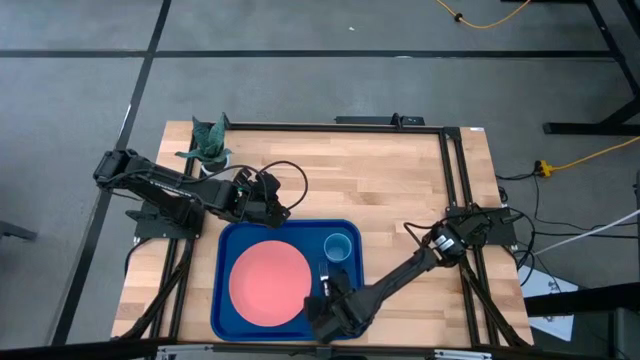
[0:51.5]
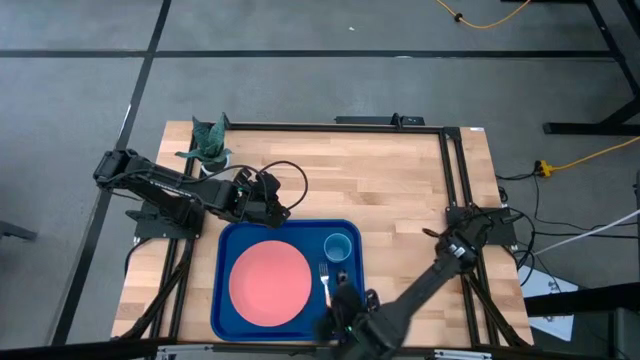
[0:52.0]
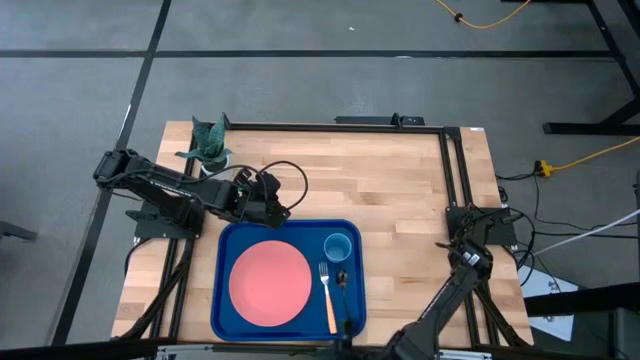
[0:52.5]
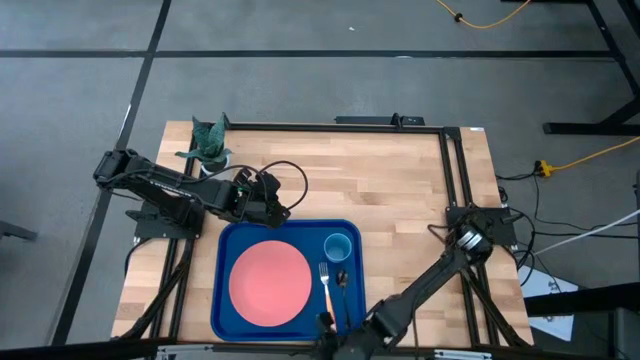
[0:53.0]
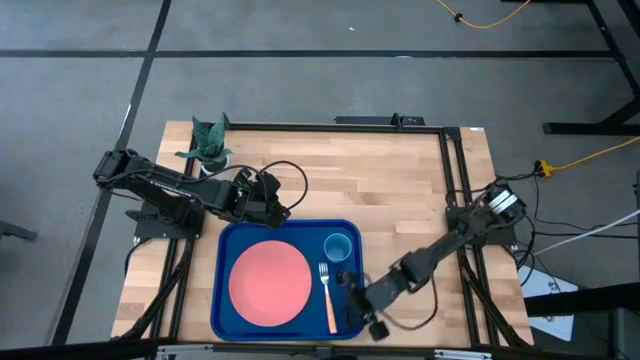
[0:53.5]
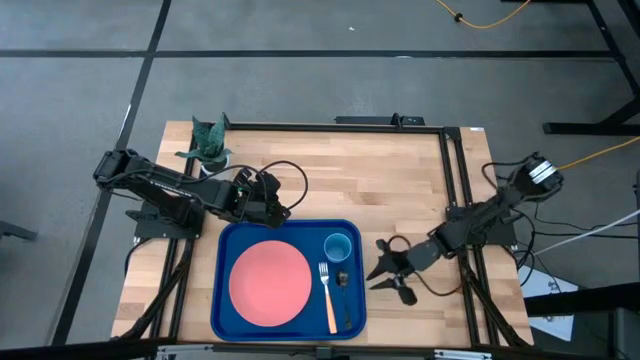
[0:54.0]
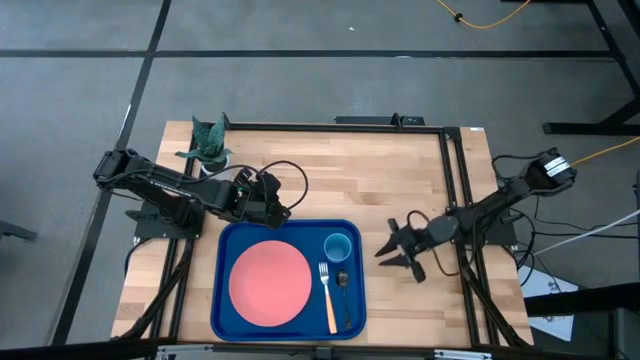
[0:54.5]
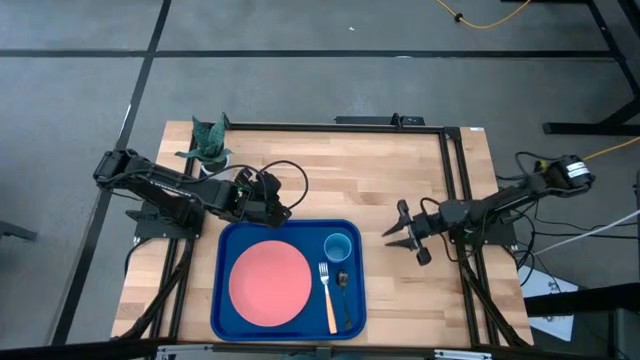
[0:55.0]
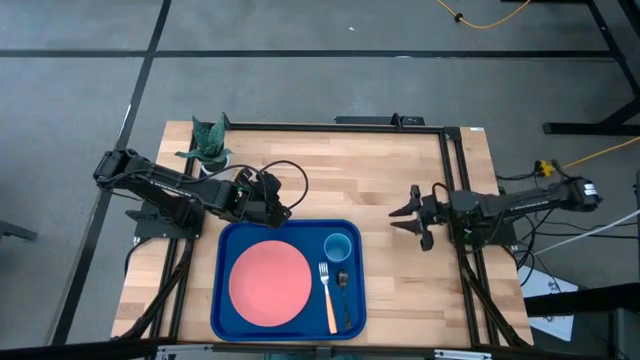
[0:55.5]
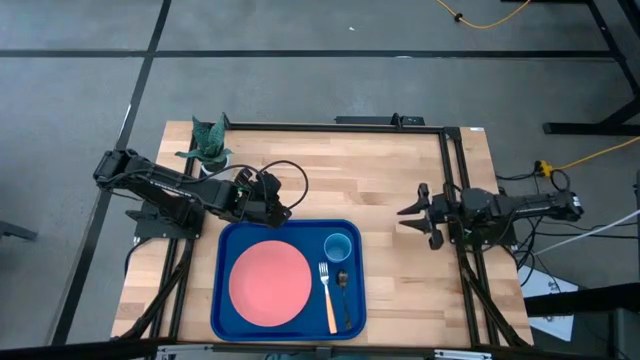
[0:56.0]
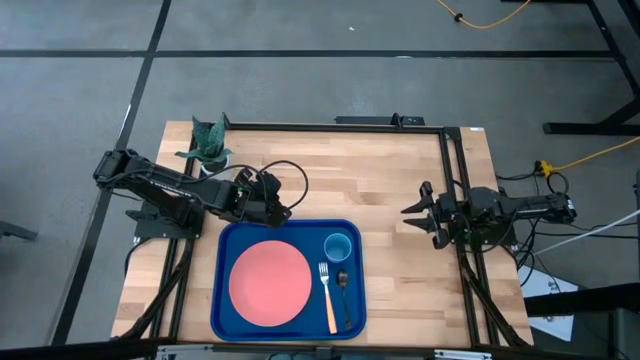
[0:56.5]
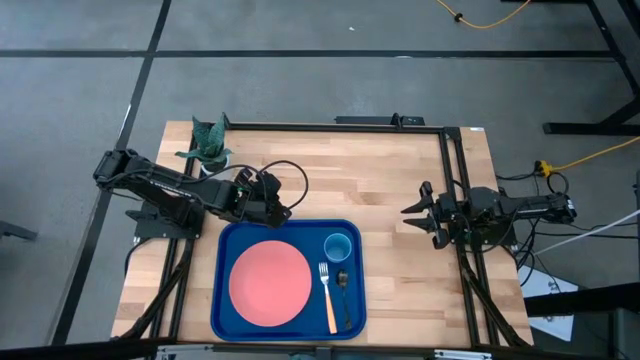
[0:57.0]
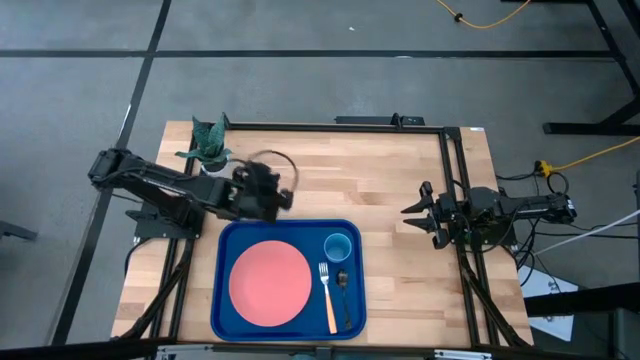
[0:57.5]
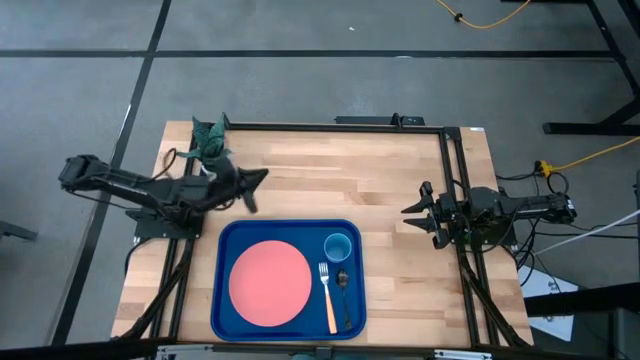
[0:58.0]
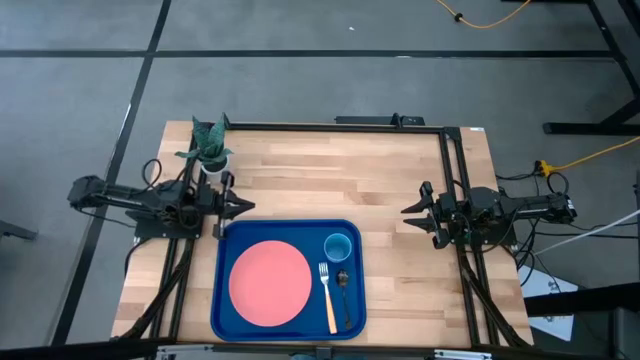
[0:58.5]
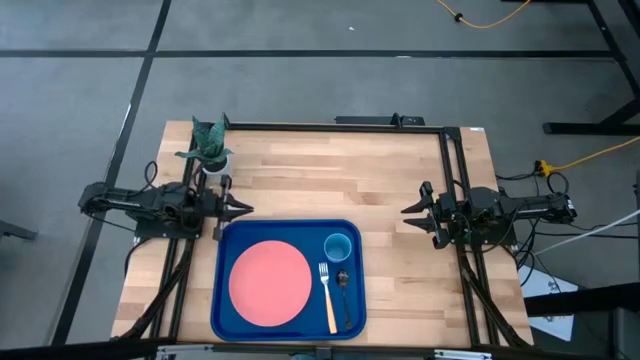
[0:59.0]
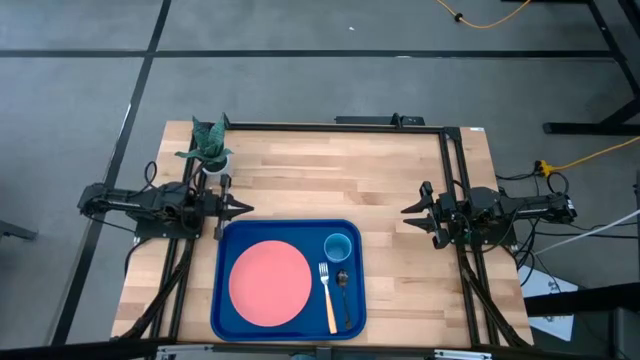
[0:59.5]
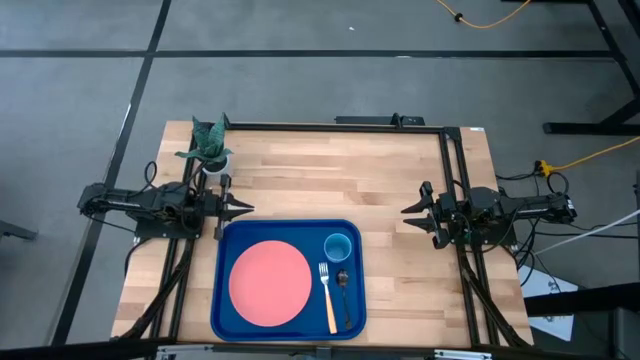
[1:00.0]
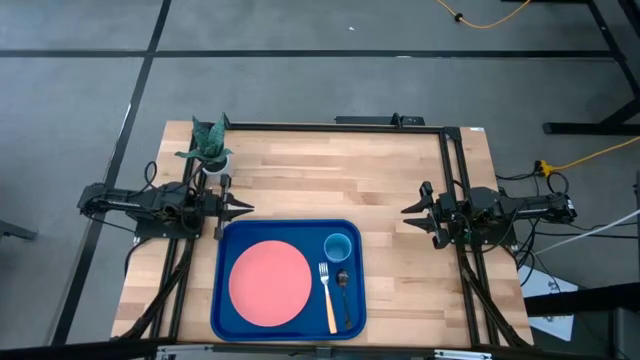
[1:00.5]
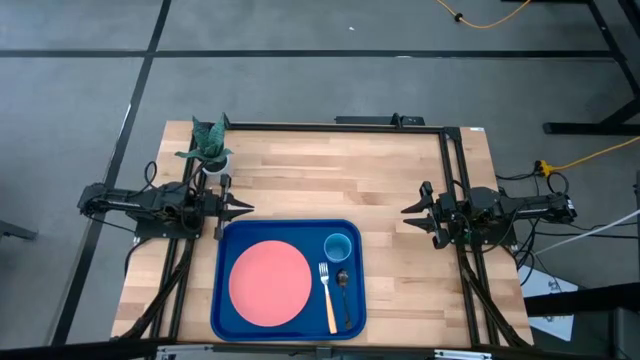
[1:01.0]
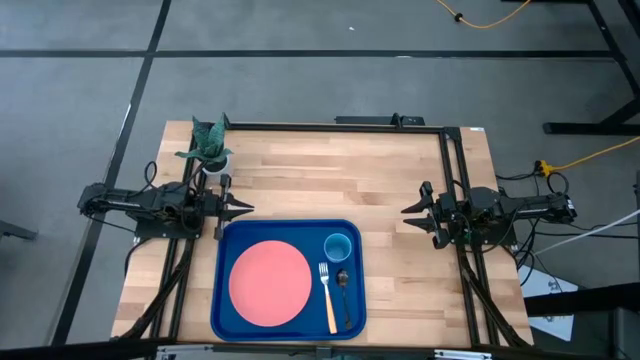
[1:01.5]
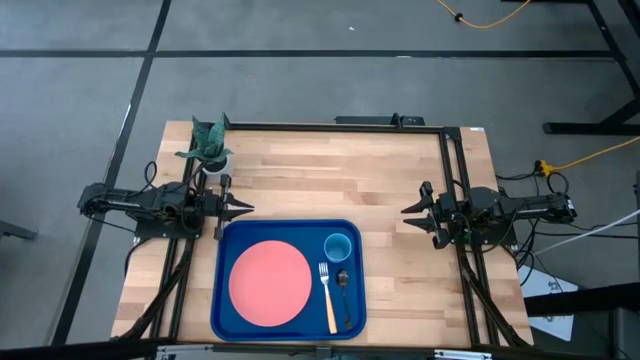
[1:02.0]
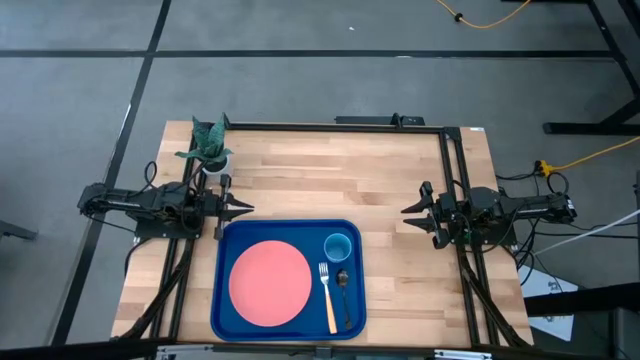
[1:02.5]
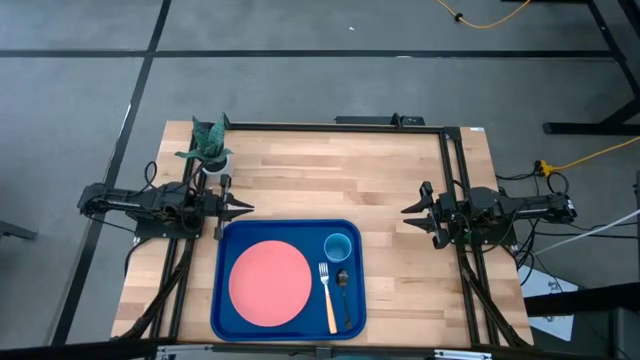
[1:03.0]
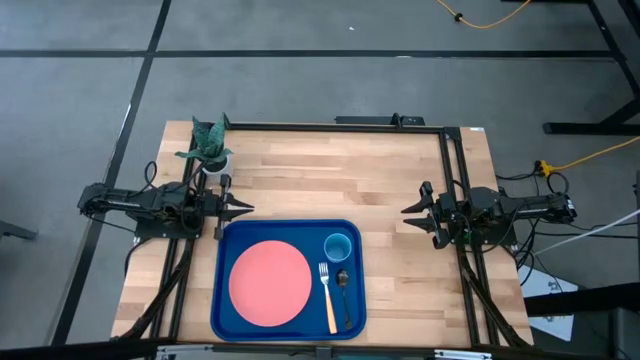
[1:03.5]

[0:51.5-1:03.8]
Task: Pick and place plate/cup/fork/spoon on tray
Return to Home Position

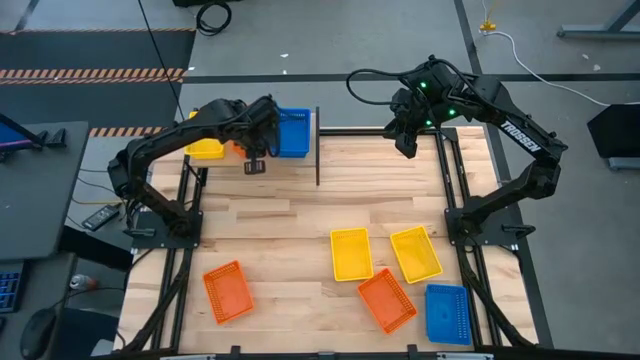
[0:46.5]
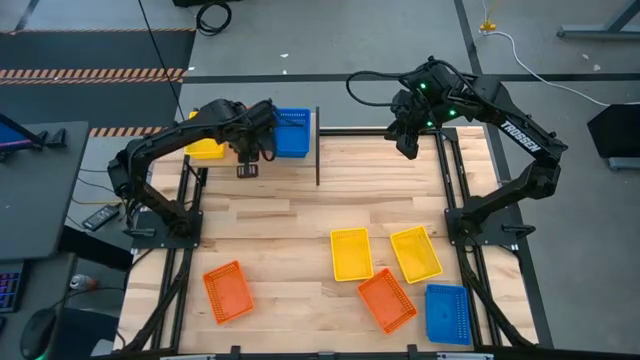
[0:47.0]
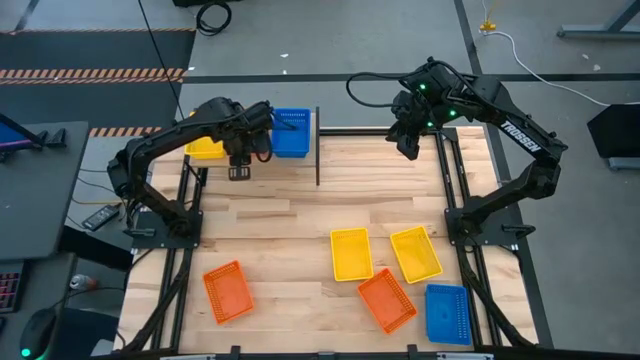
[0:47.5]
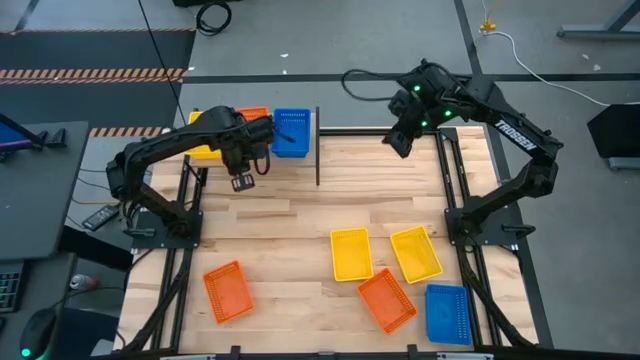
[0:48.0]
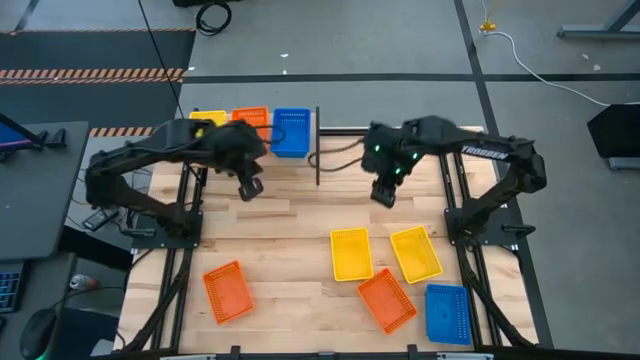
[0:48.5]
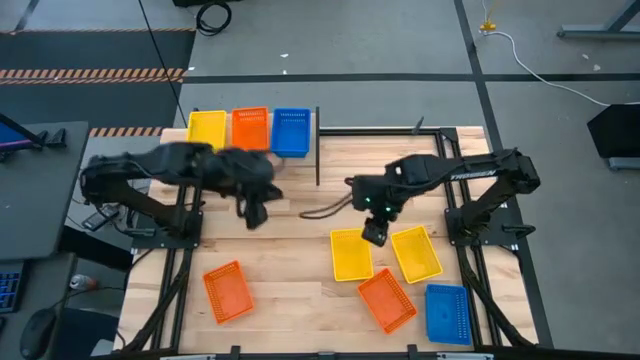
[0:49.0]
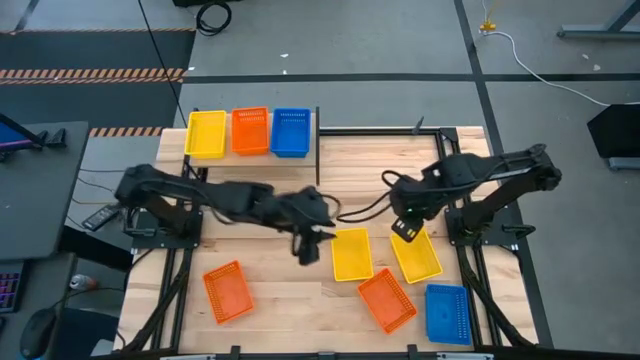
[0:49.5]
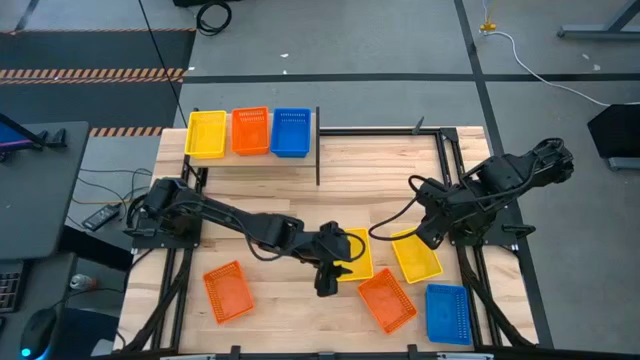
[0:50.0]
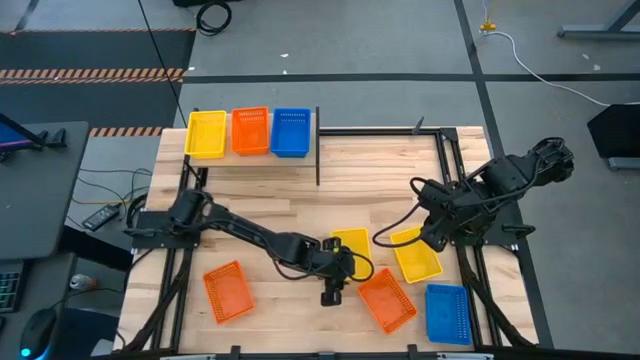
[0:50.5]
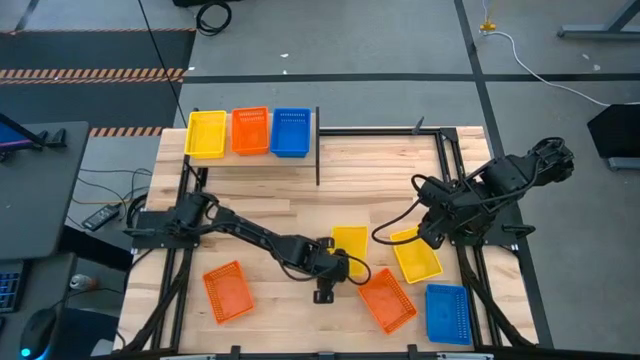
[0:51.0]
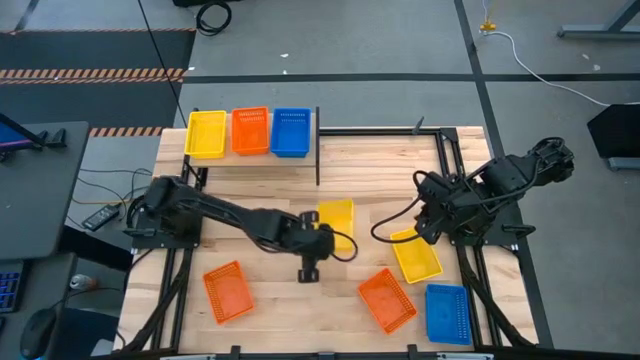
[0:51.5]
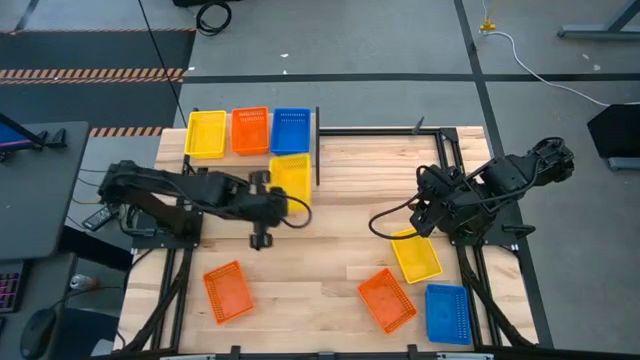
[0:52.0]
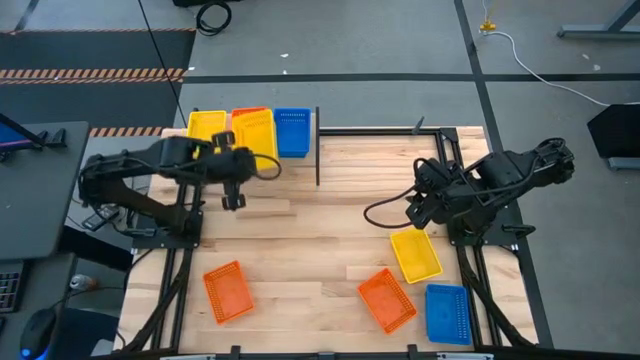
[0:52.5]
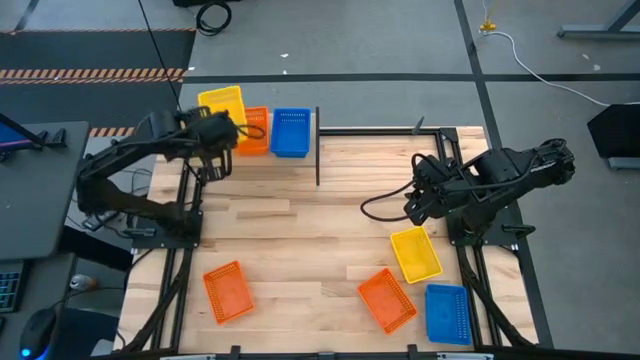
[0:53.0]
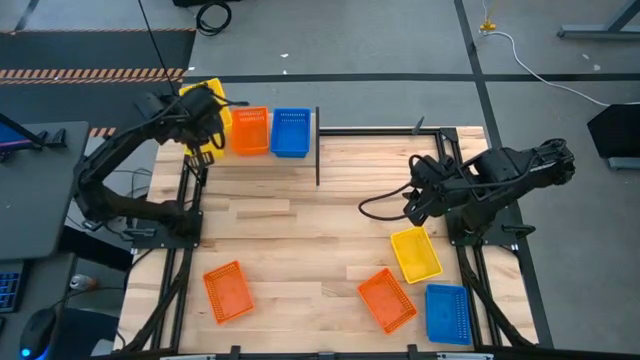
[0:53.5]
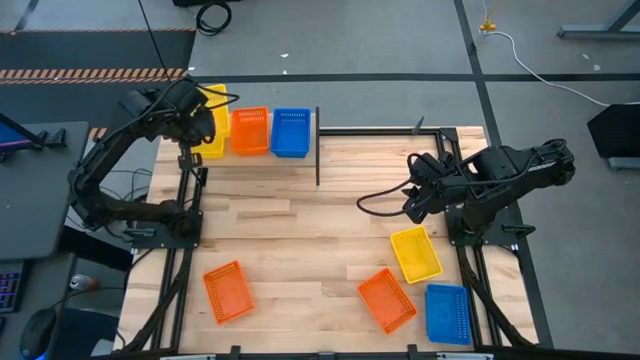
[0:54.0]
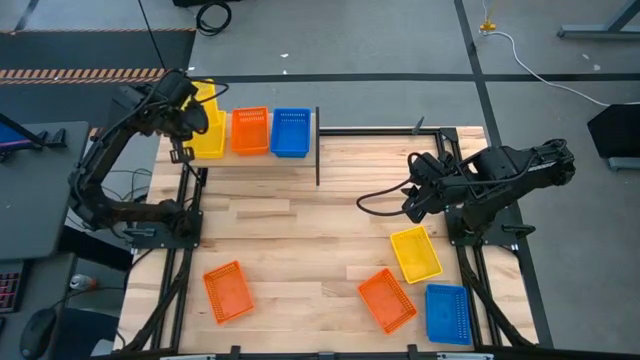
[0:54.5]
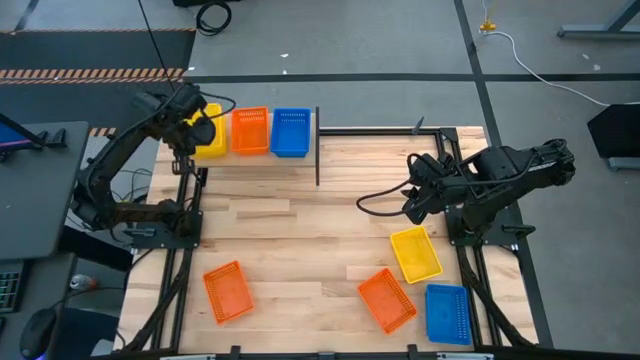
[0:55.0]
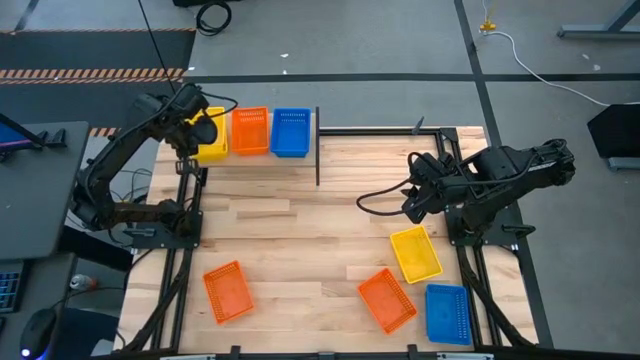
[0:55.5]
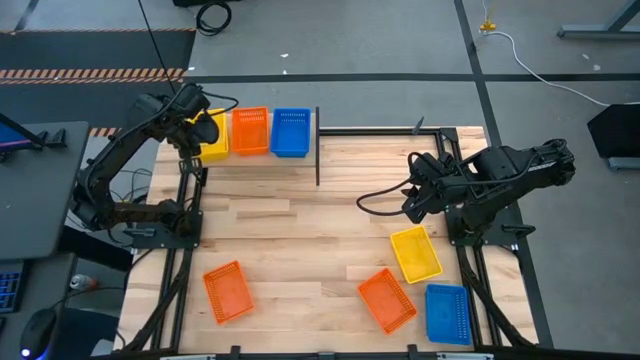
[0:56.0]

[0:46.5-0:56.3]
Task: Stack baskets on shelf by color
Stack the left yellow bin on top of the yellow bin on the shelf
